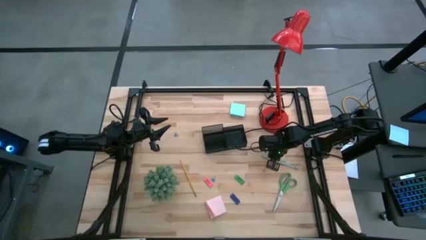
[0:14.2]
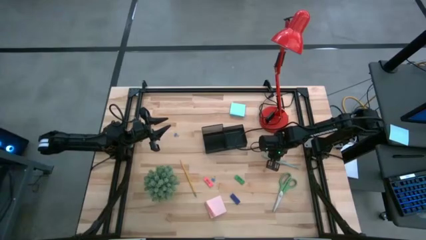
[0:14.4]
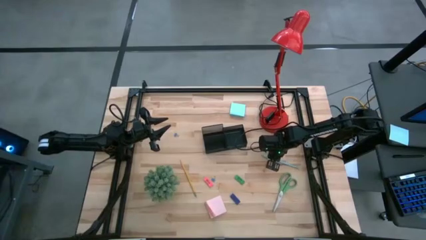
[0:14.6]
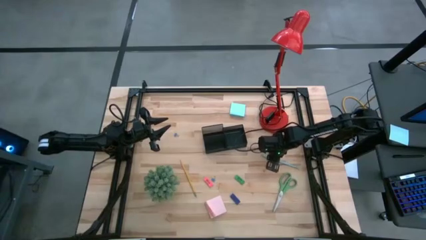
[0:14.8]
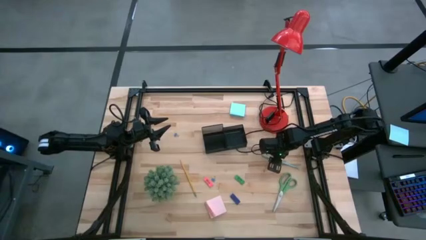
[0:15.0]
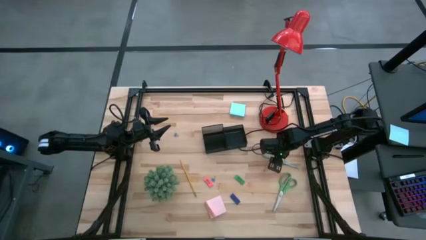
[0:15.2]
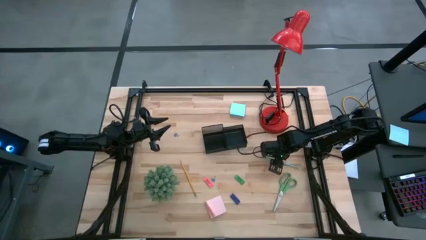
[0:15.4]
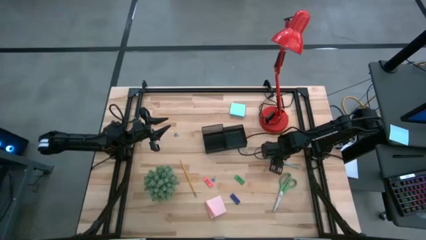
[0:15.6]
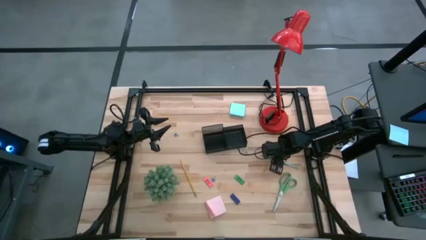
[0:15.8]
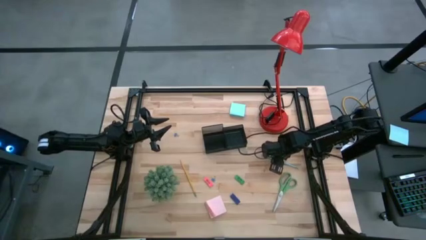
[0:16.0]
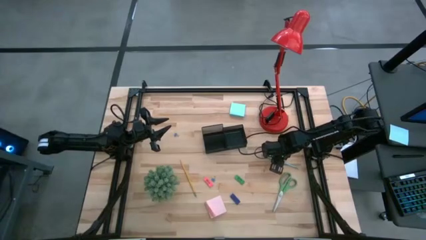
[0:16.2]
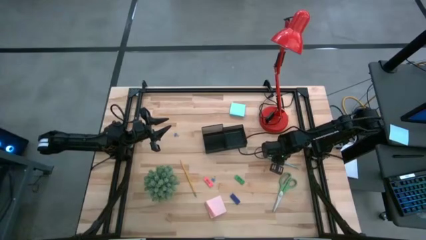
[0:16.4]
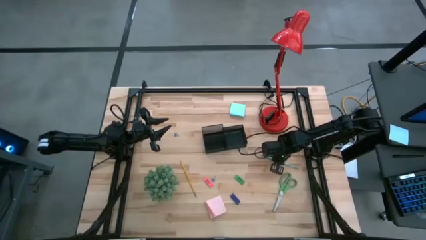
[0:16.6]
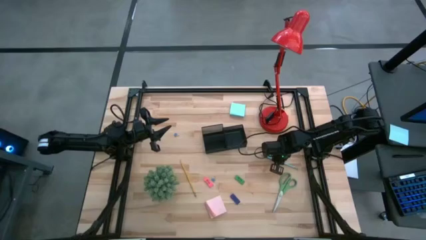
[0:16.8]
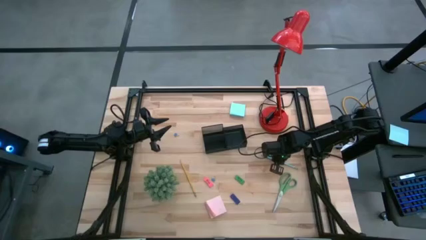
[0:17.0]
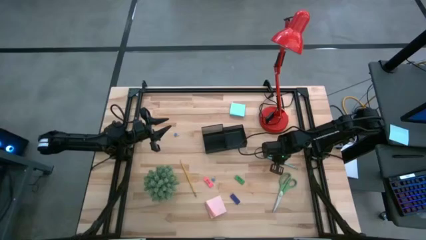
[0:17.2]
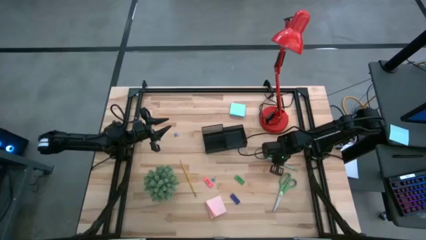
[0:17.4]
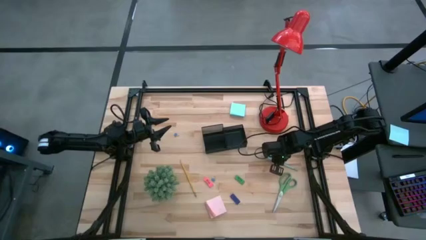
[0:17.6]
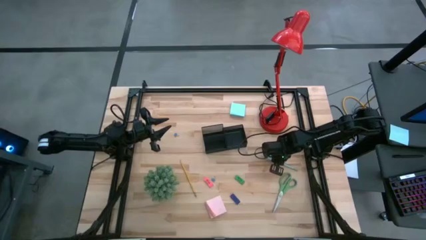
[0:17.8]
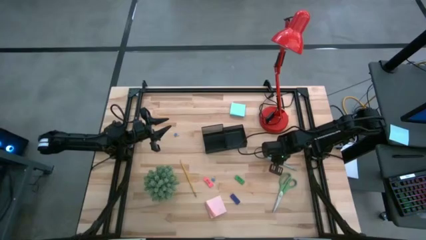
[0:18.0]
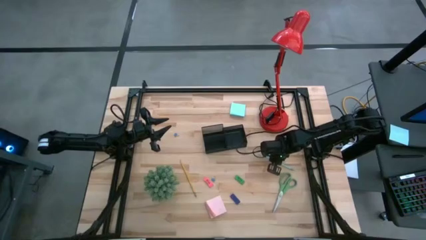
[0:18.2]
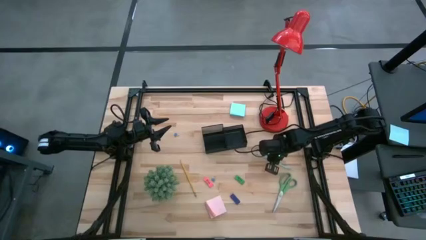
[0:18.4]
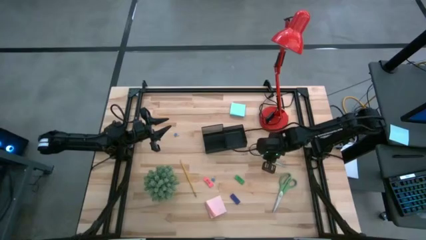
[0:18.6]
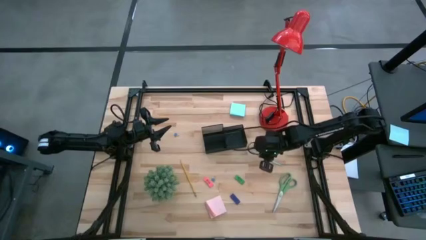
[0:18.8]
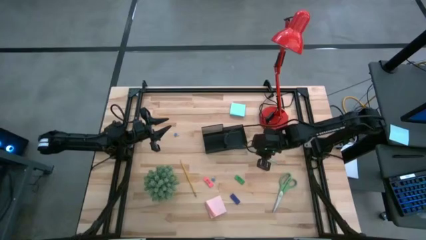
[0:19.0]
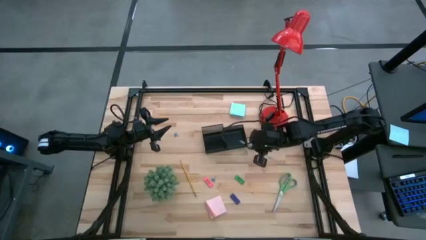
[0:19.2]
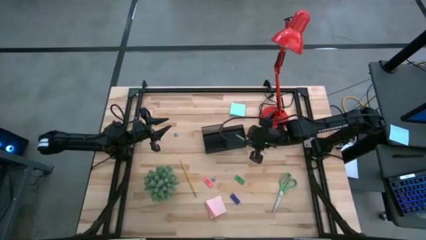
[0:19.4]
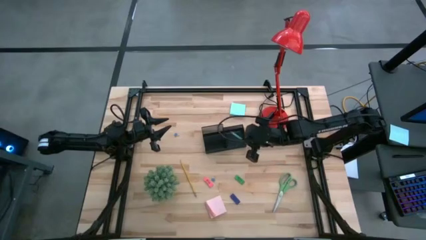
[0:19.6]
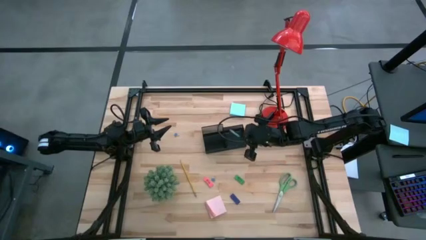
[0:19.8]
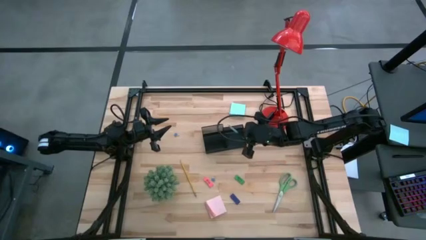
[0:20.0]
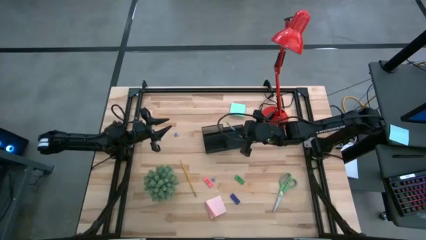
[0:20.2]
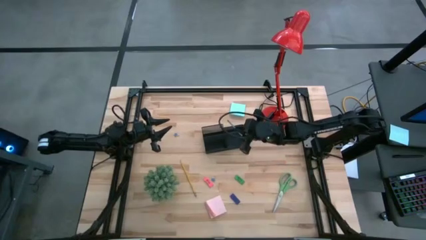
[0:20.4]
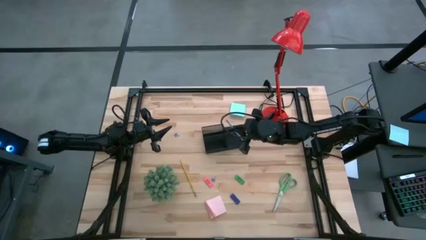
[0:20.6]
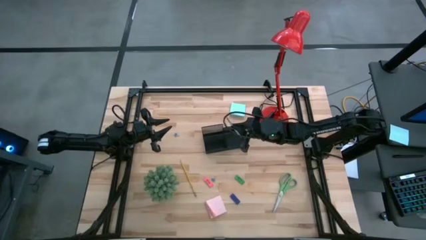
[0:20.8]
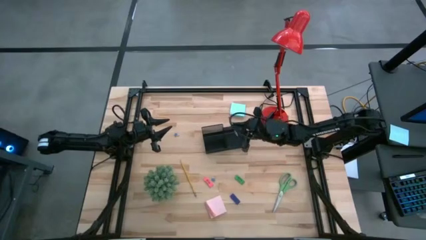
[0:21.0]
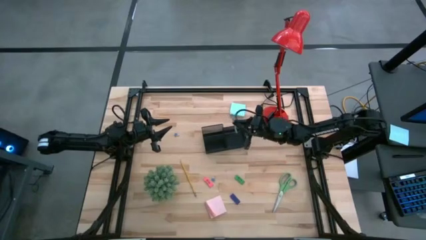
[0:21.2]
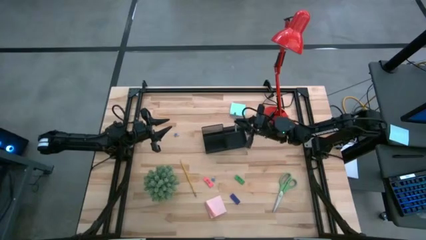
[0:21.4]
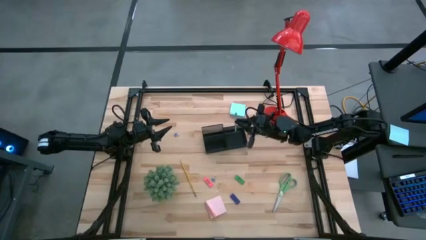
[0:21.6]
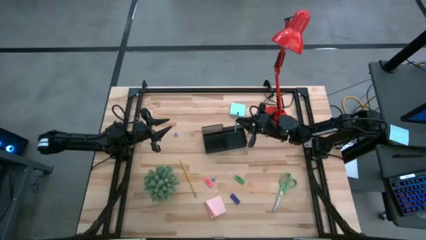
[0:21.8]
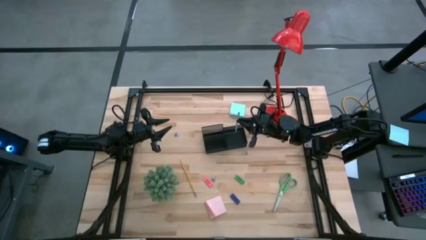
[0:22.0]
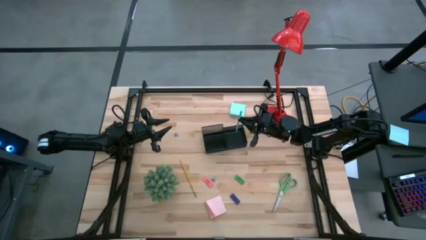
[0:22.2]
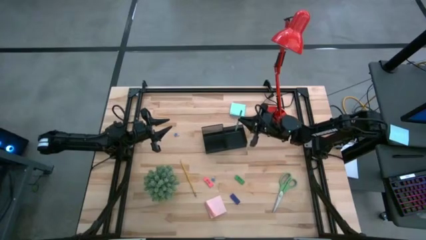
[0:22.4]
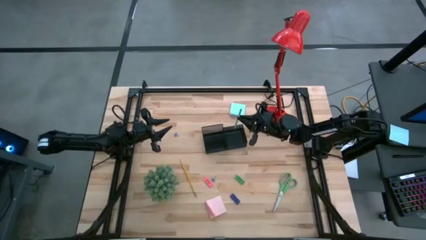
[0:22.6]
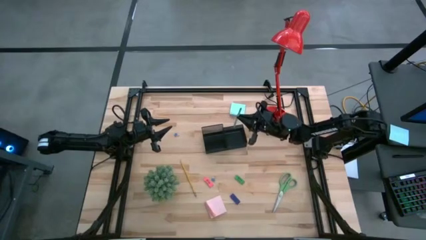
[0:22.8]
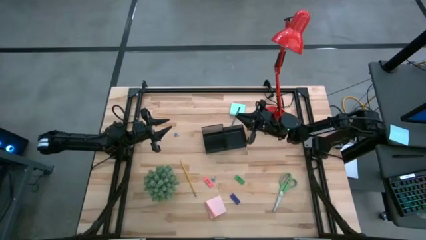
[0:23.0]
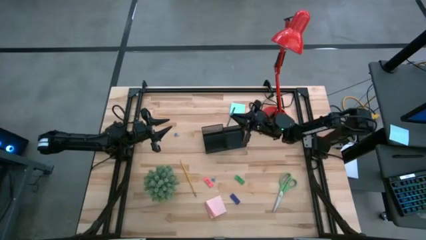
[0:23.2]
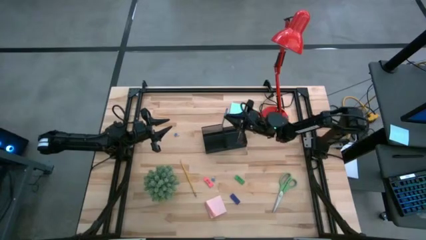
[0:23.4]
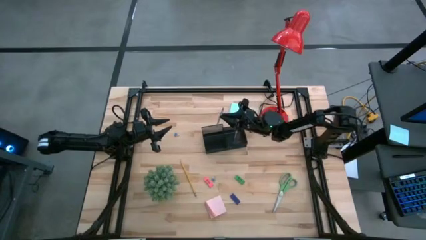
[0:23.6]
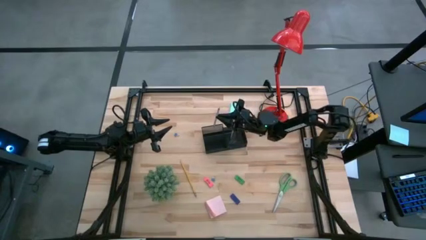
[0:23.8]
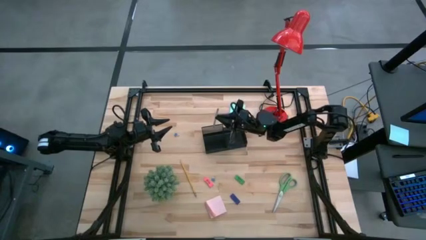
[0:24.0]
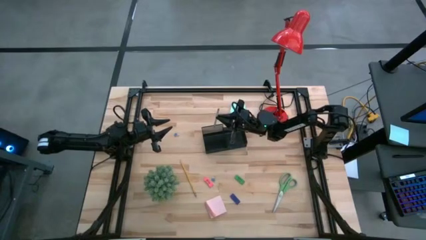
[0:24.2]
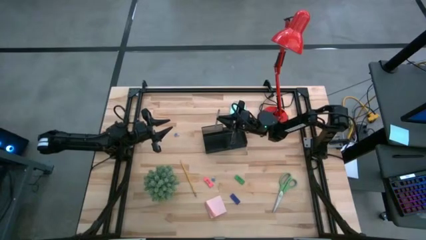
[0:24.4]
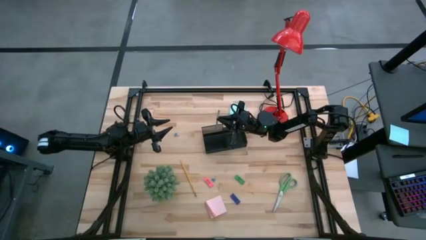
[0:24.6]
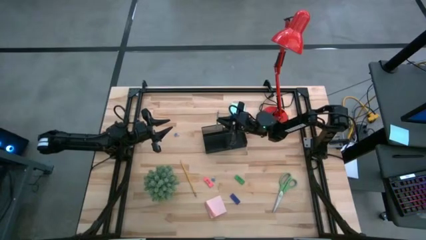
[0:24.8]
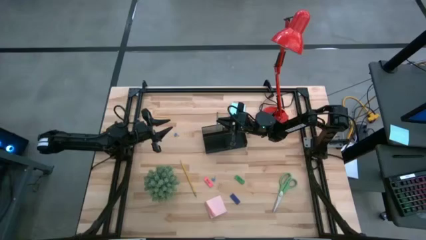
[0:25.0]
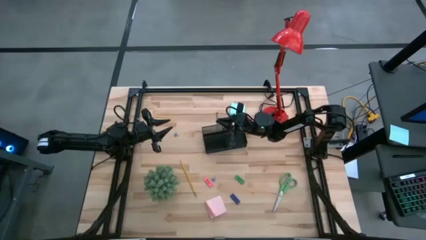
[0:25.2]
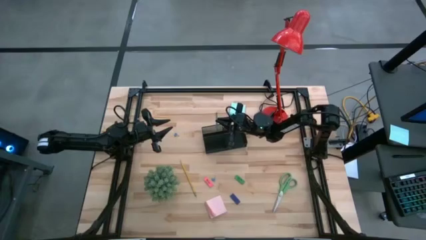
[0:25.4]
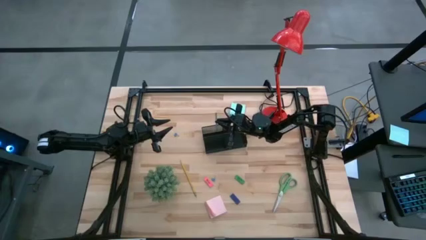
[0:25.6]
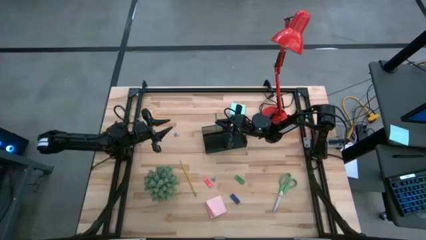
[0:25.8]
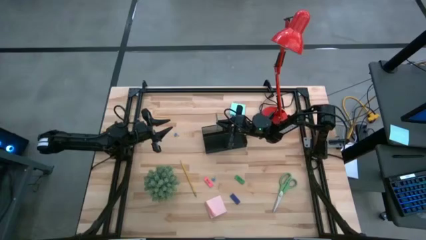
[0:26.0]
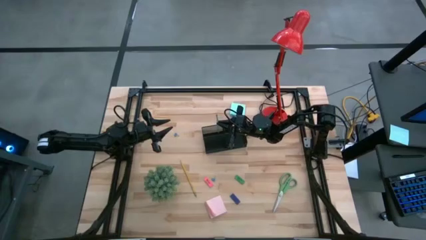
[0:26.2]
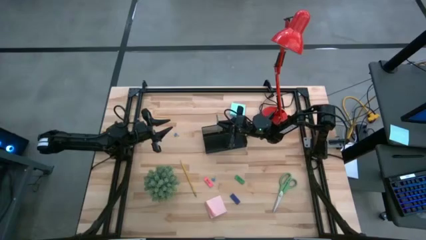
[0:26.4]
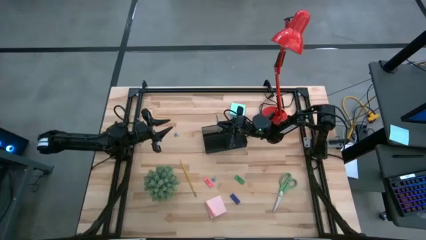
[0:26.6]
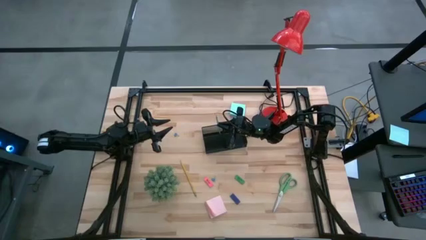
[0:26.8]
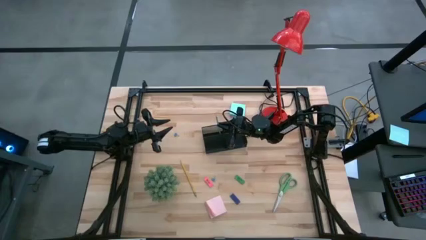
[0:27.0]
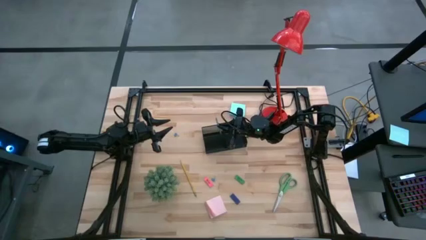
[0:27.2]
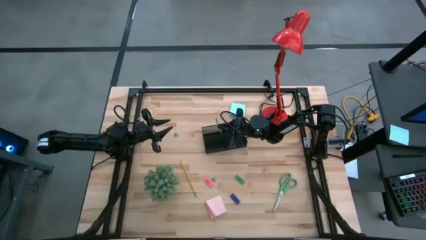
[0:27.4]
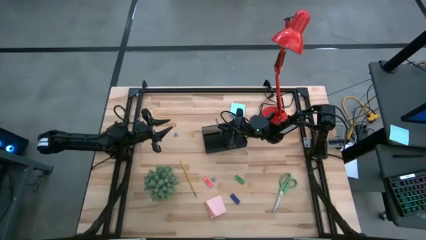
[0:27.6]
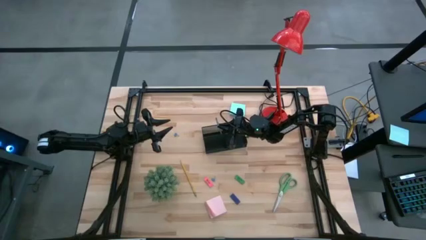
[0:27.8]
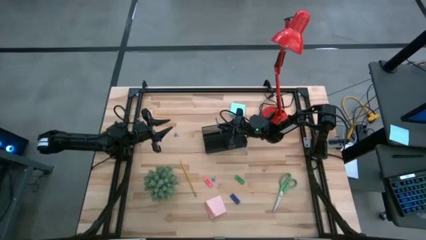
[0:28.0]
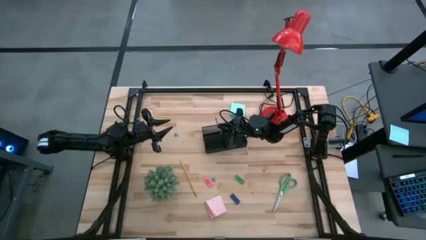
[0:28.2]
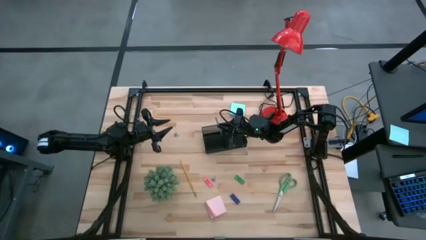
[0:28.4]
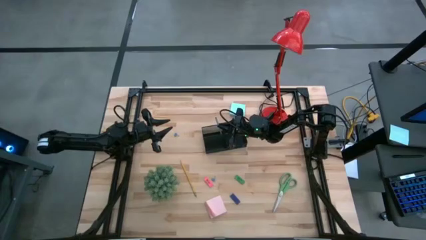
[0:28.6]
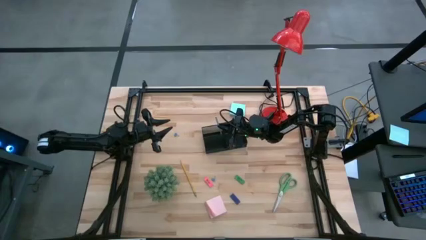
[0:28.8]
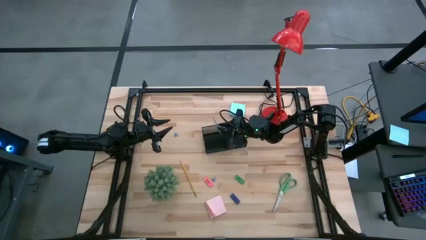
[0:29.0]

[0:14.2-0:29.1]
Task: Pick and place office supplies into organizer
Put the blue pencil into the black desk organizer
